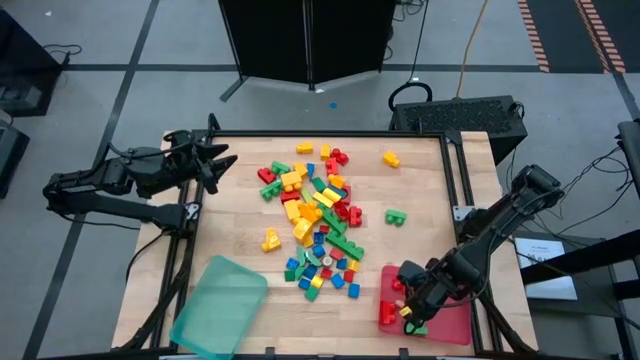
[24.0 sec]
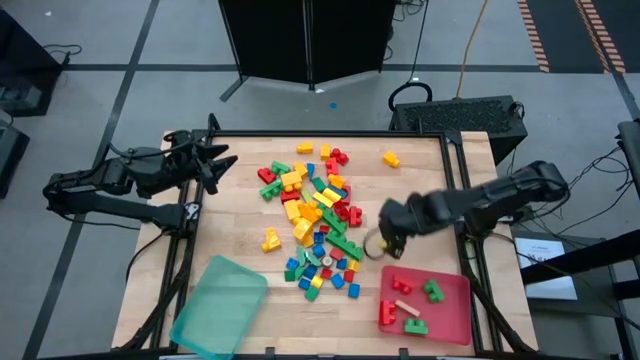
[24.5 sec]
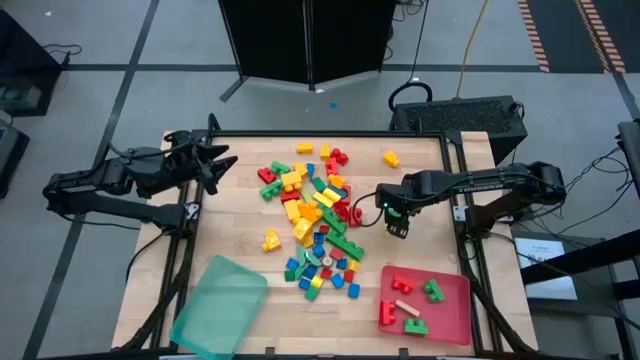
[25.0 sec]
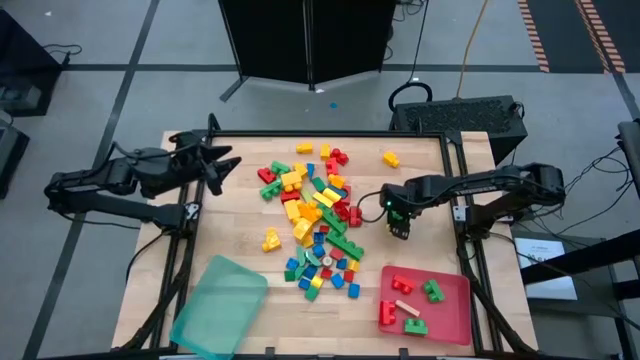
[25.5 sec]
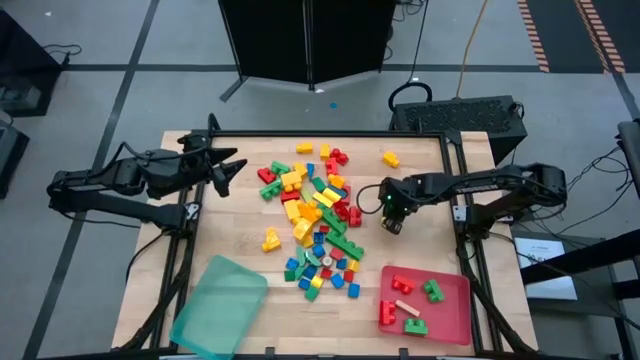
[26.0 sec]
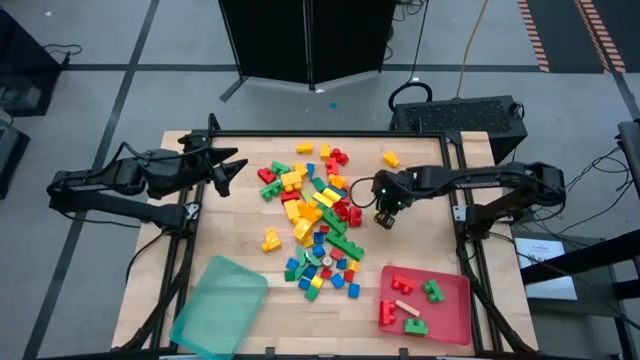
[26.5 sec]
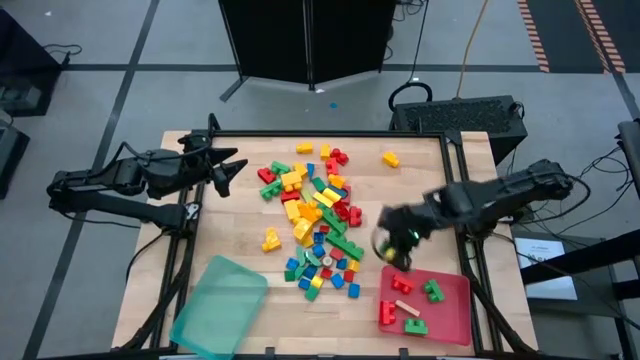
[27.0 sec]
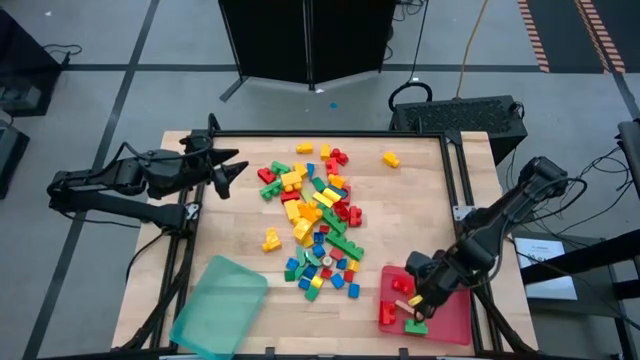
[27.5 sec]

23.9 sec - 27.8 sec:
Task: Sort blocks by size
Put the 2-stud green game piece into the pink bin

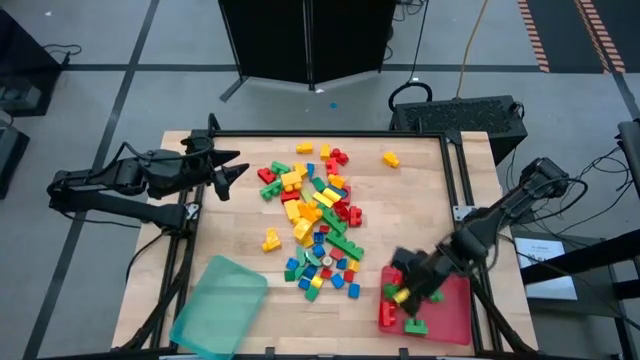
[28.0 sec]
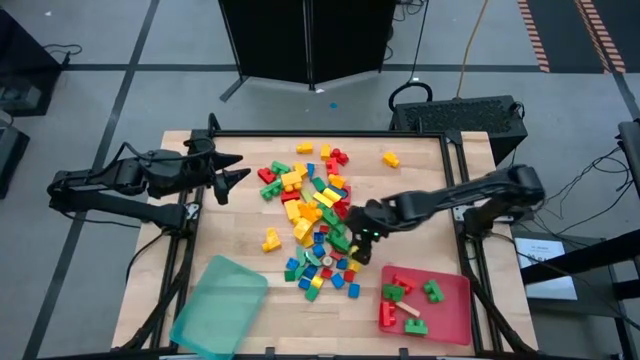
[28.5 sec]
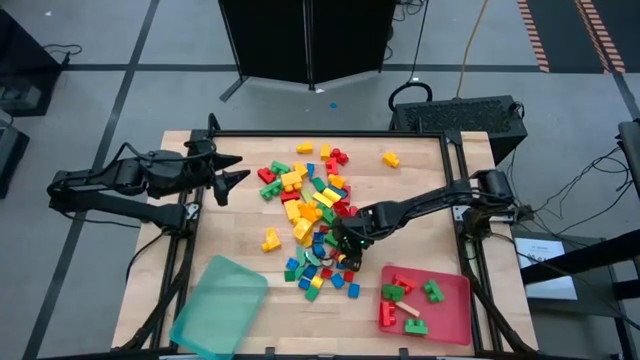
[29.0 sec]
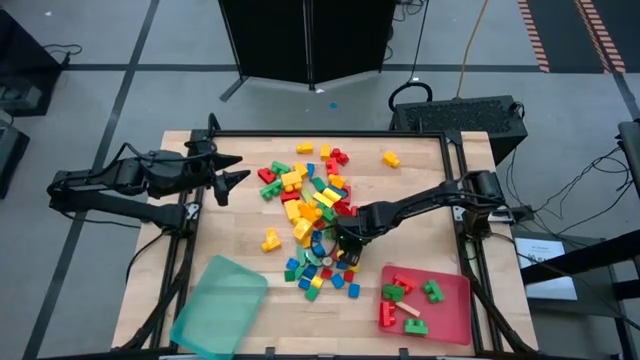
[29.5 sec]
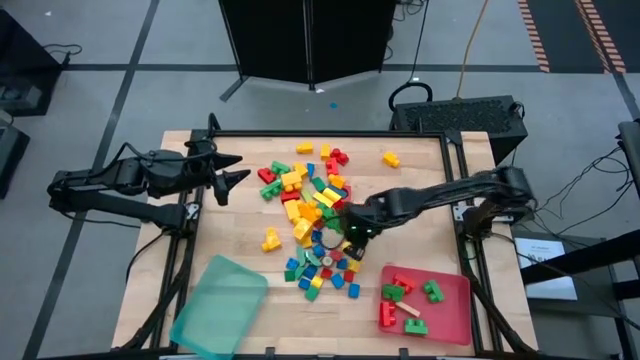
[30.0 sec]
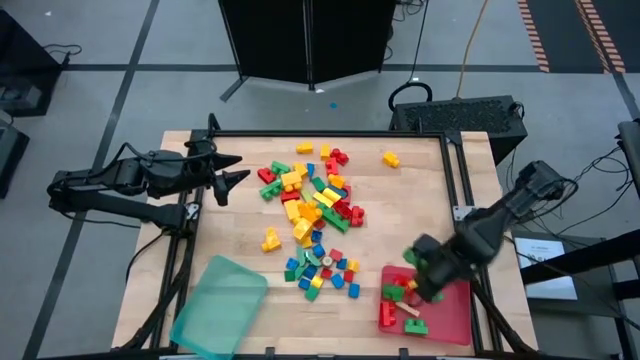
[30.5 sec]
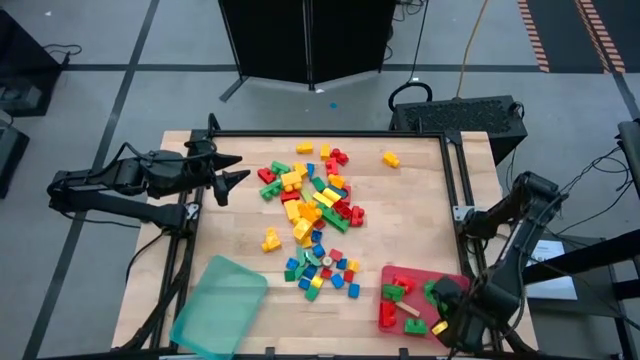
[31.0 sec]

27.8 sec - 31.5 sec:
Put the 4-stud green game piece into the pink bin

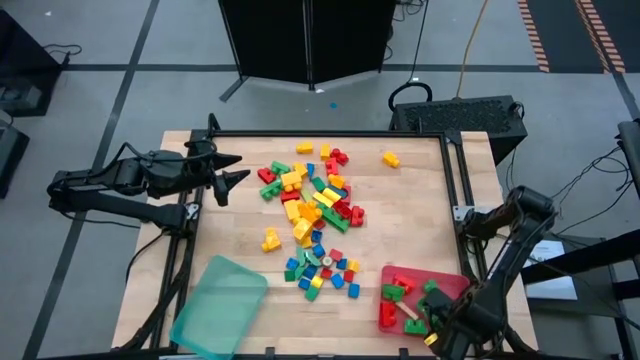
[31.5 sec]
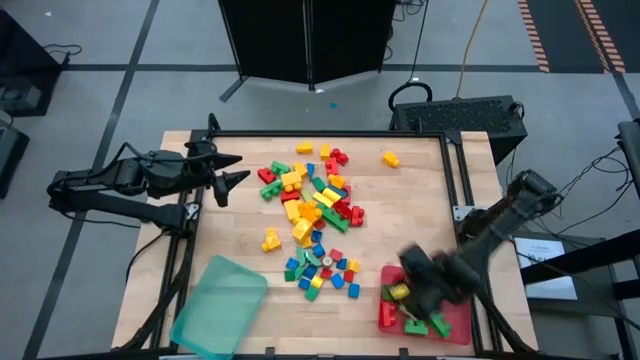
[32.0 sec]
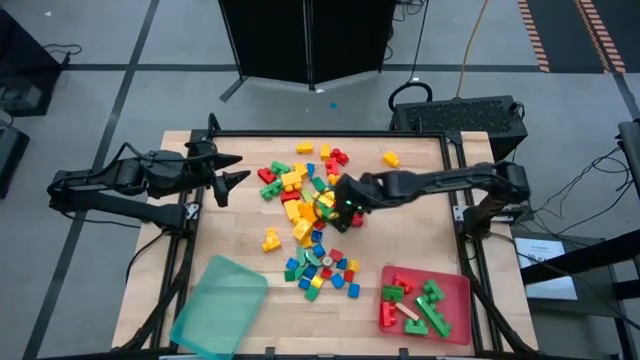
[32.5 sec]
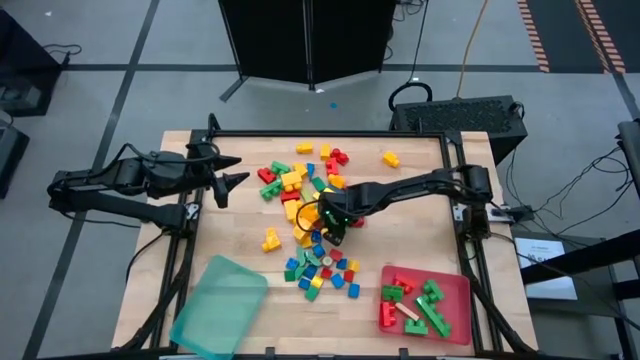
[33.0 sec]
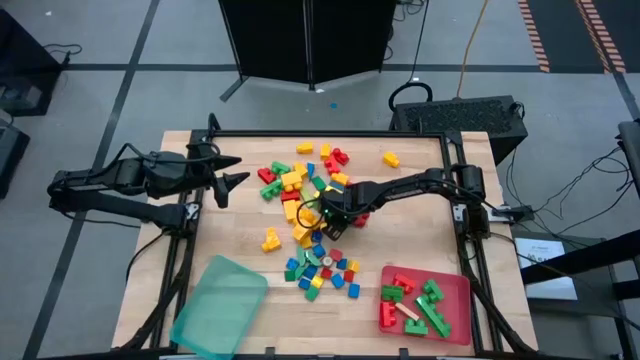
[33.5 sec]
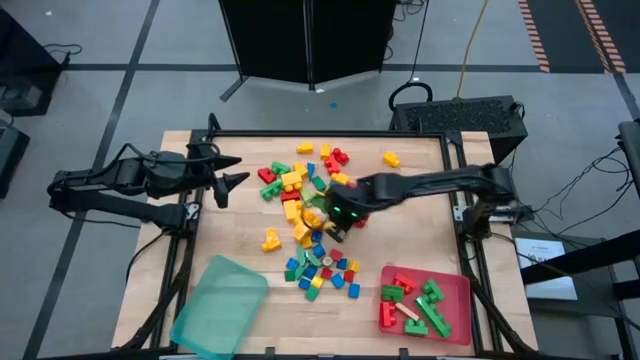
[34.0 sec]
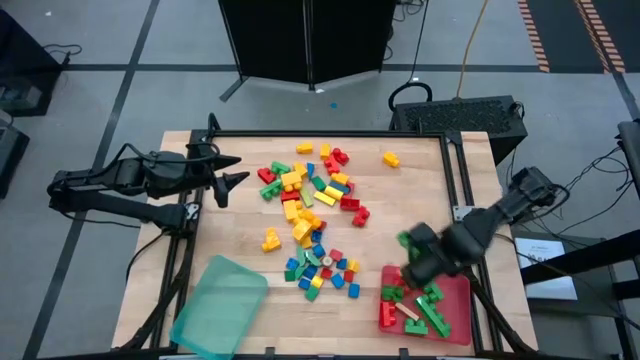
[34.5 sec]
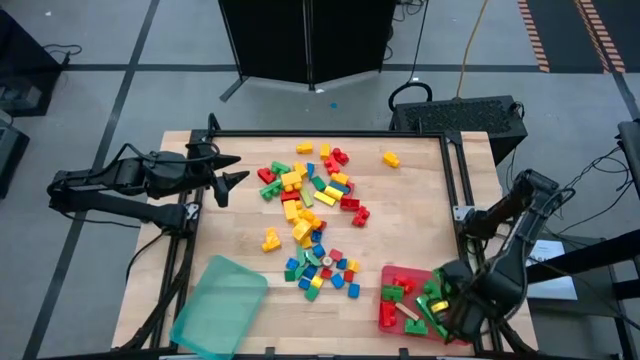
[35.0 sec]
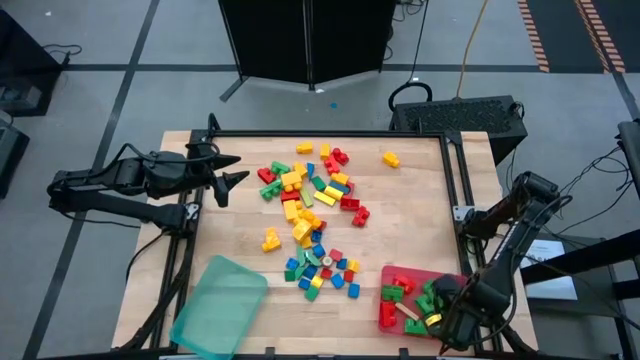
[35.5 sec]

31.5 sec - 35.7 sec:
Put the 4-stud green game piece into the pink bin

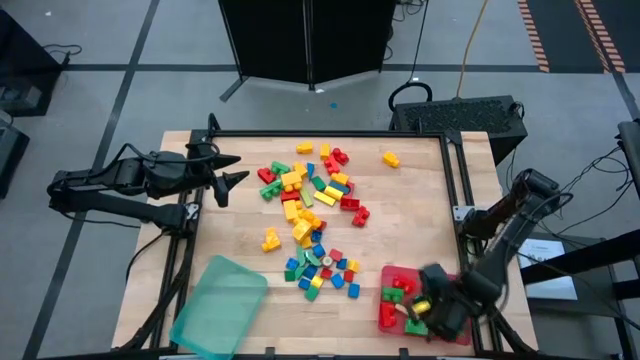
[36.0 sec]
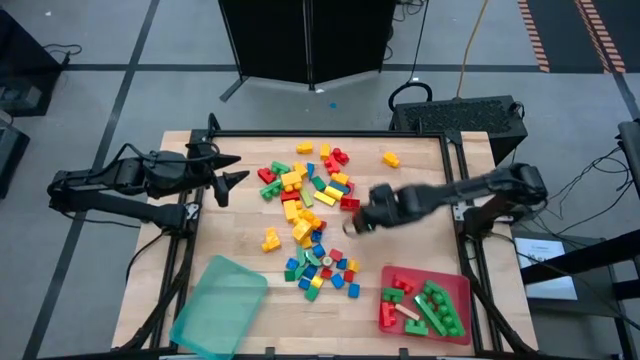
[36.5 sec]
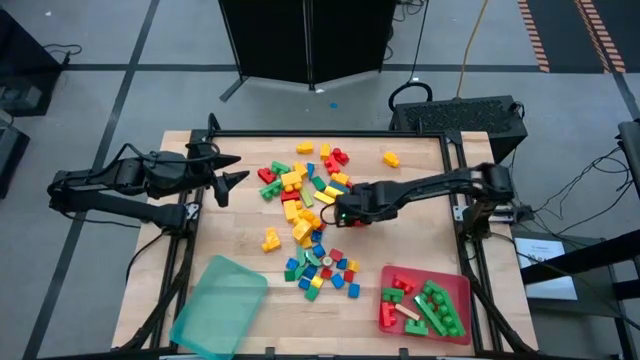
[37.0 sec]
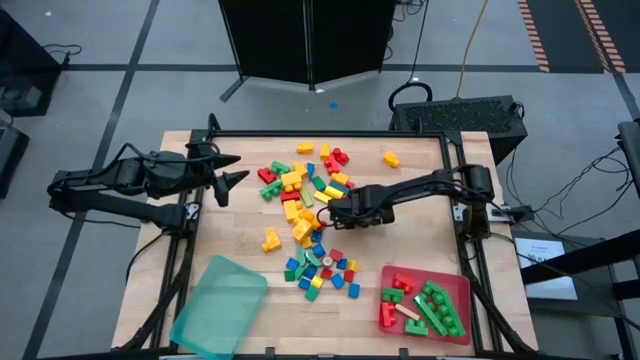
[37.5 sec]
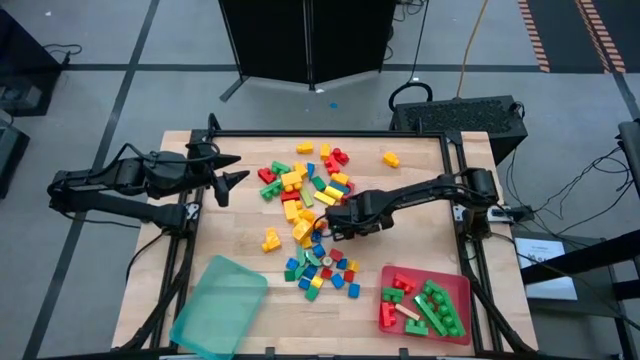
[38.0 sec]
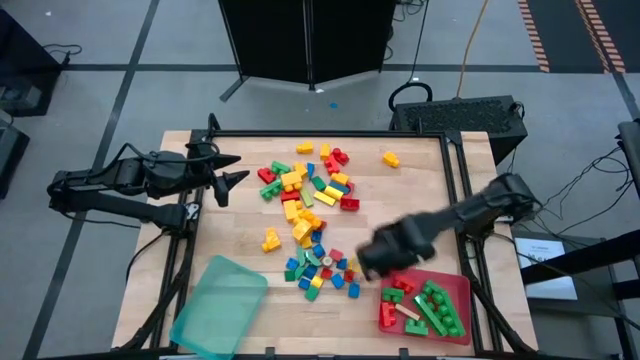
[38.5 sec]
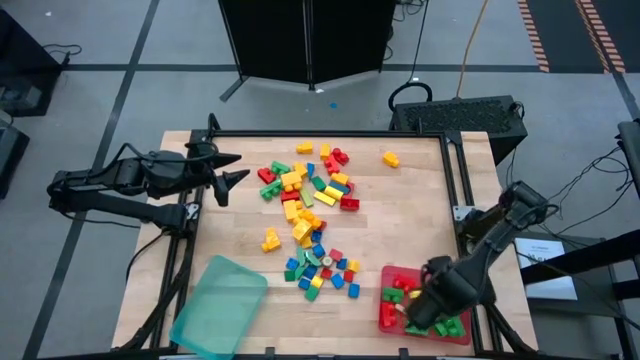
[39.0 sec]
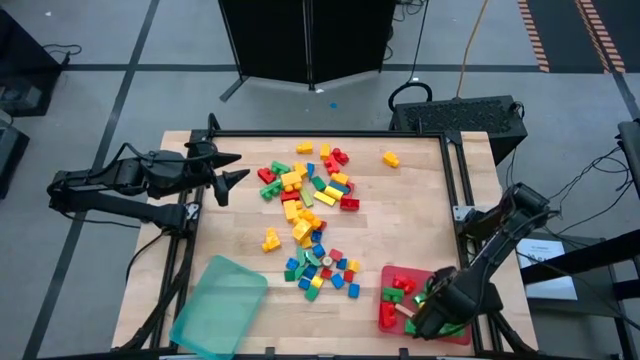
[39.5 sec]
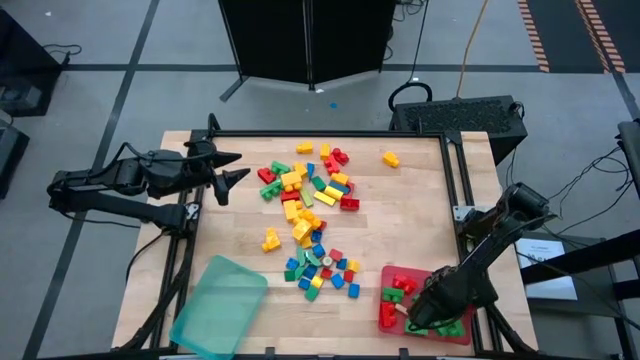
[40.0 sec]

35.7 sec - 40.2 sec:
Put the 2-stud red game piece into the pink bin

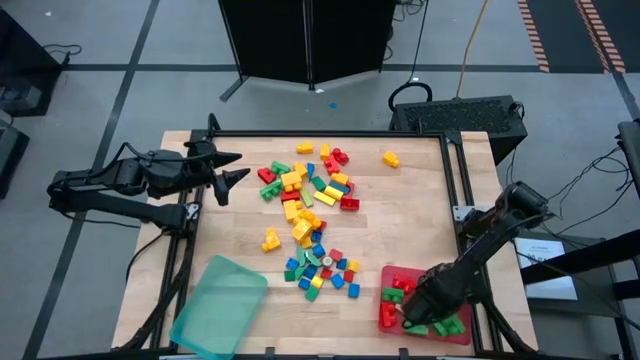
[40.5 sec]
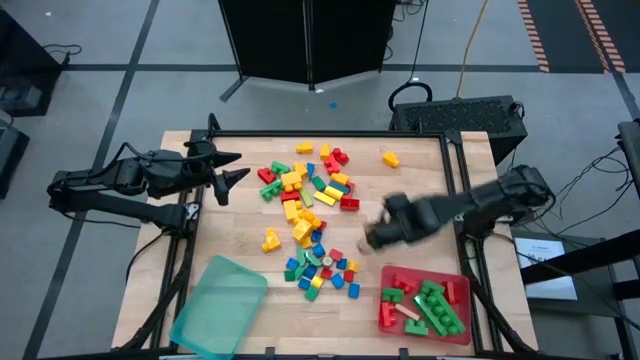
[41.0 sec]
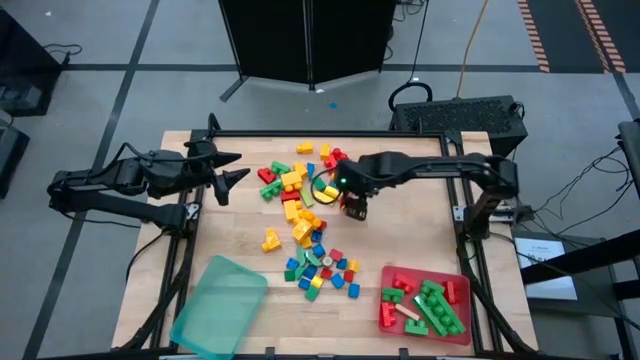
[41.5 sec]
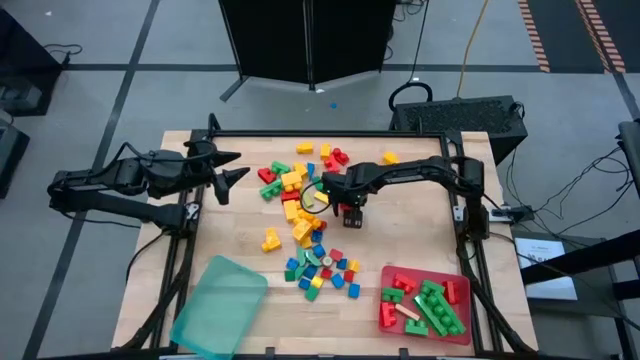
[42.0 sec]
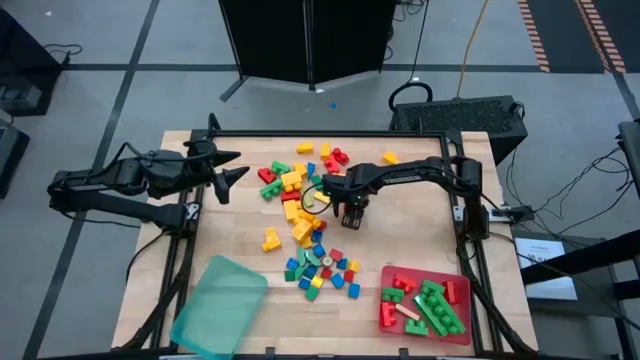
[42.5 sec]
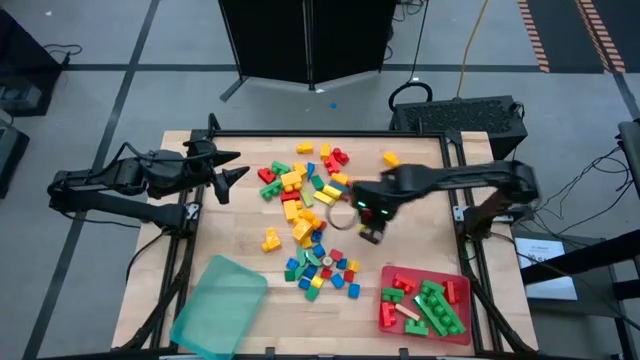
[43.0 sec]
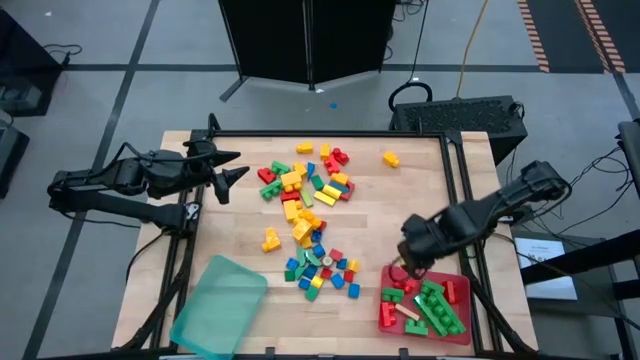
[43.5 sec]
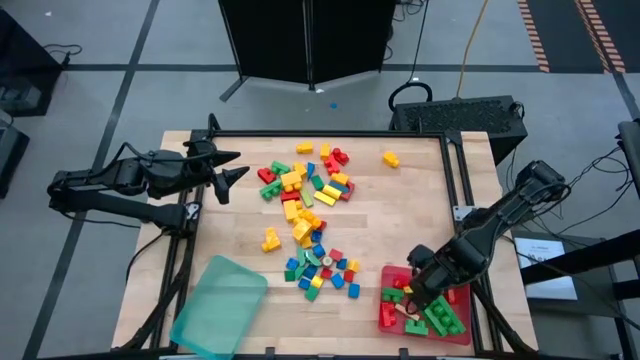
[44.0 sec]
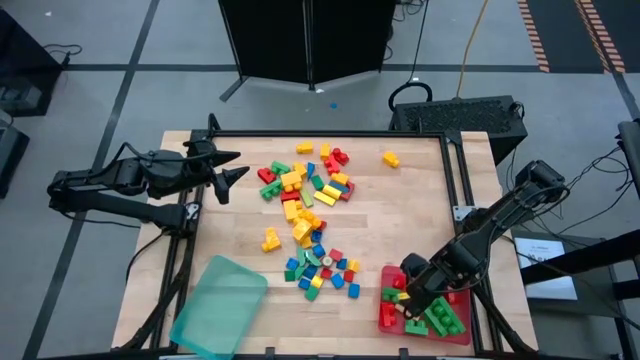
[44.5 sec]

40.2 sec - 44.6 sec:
Put the 2-stud red game piece into the pink bin
